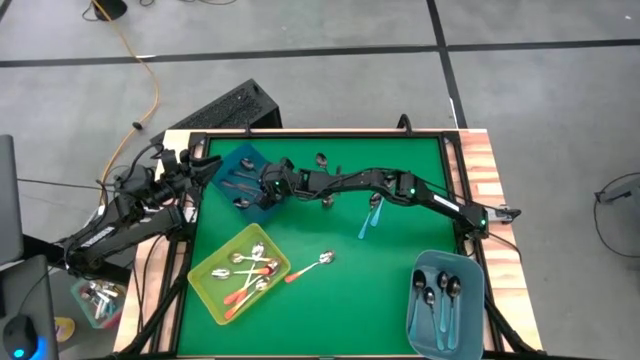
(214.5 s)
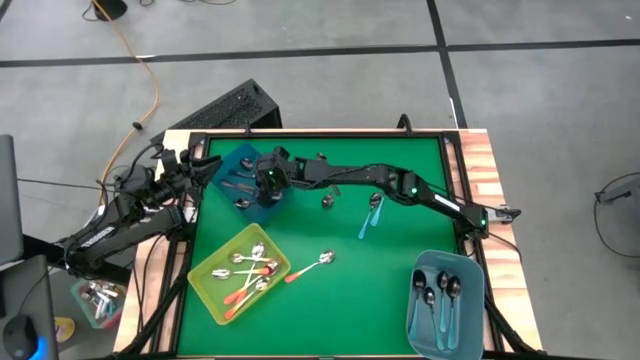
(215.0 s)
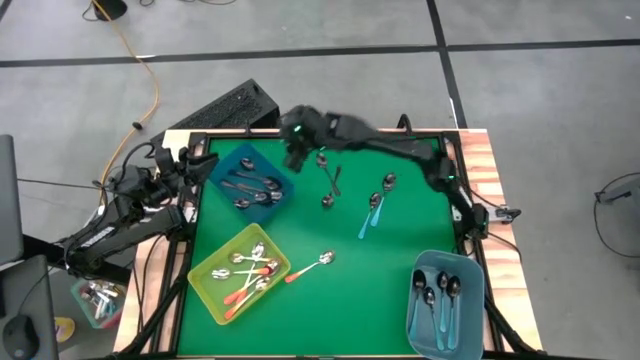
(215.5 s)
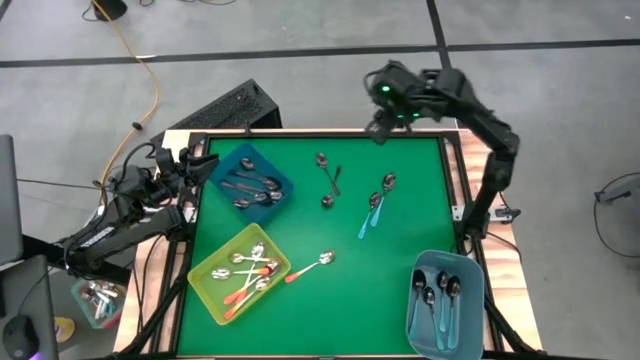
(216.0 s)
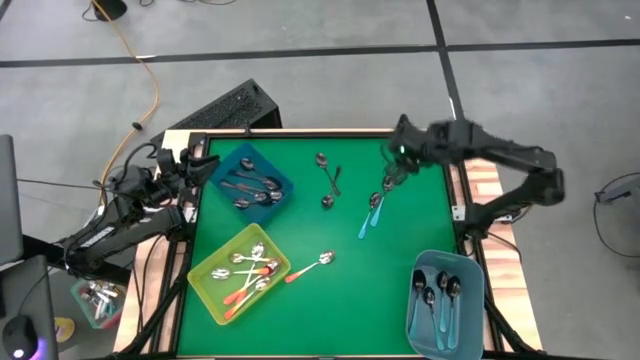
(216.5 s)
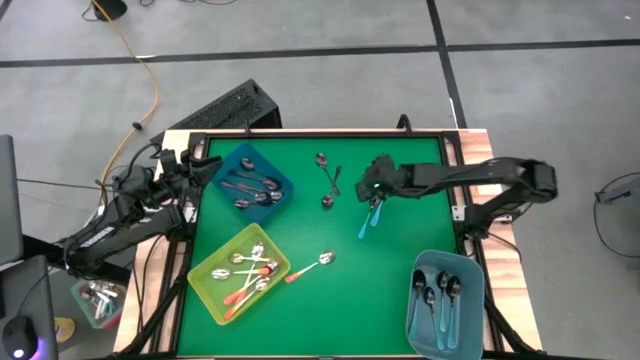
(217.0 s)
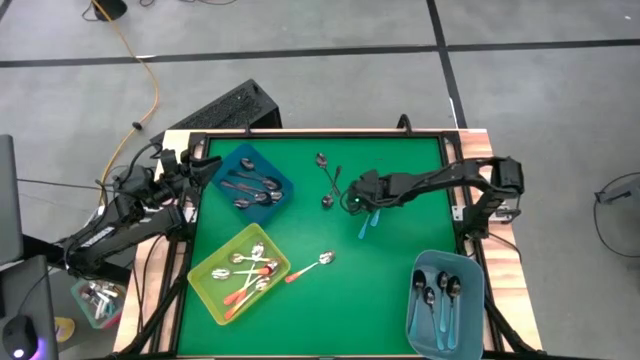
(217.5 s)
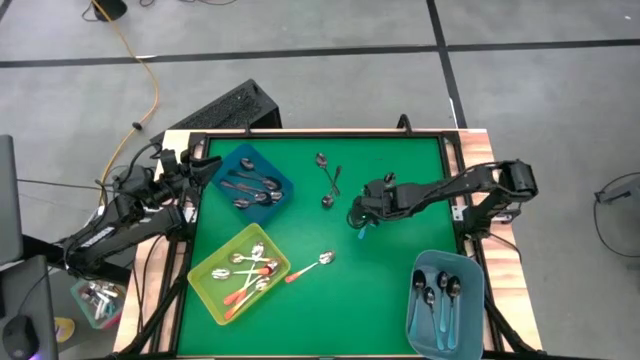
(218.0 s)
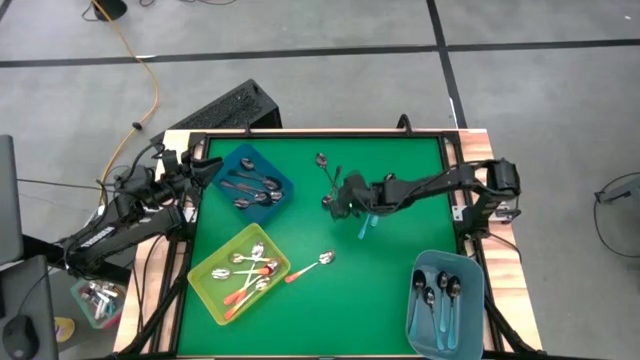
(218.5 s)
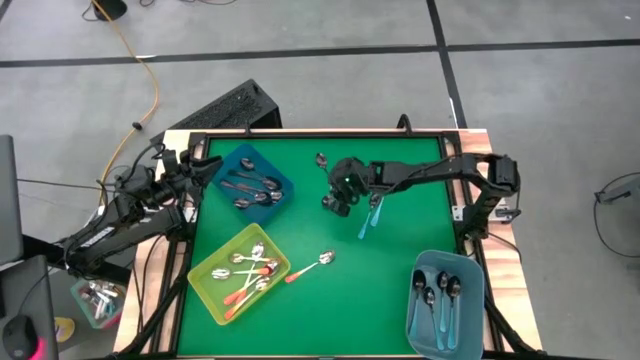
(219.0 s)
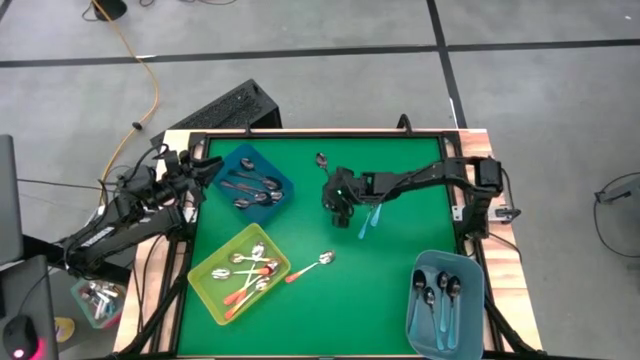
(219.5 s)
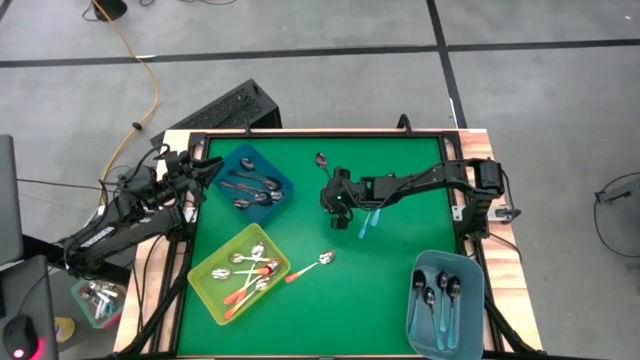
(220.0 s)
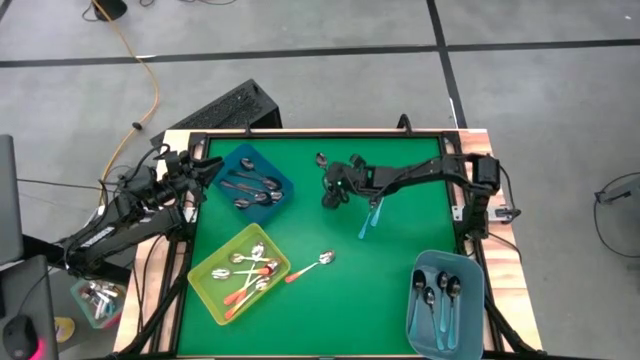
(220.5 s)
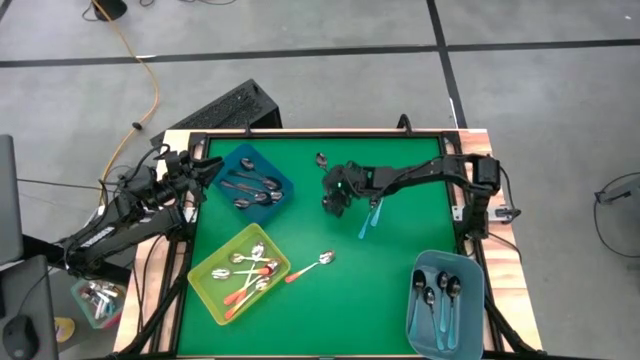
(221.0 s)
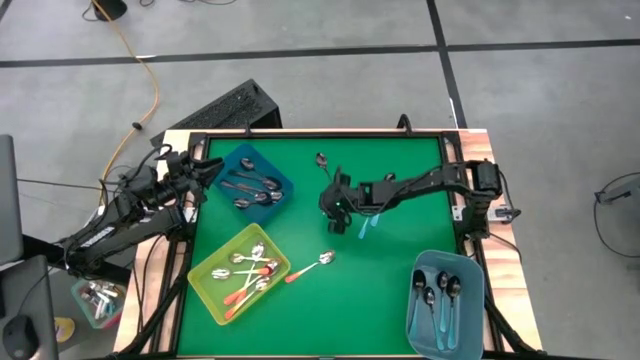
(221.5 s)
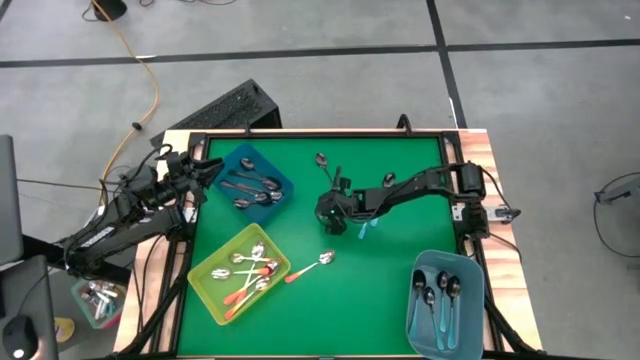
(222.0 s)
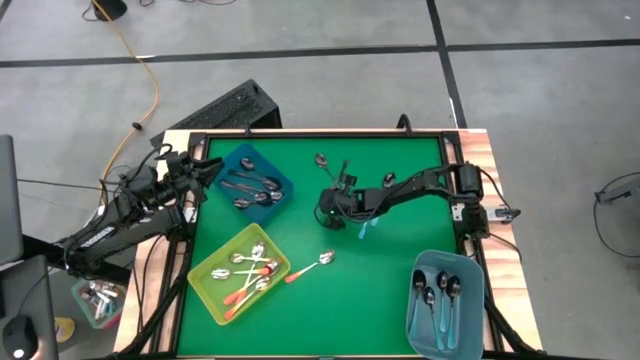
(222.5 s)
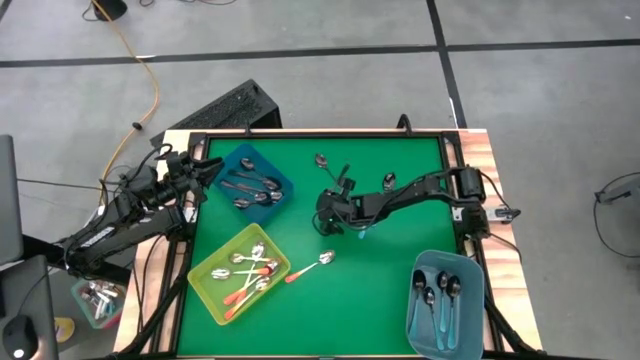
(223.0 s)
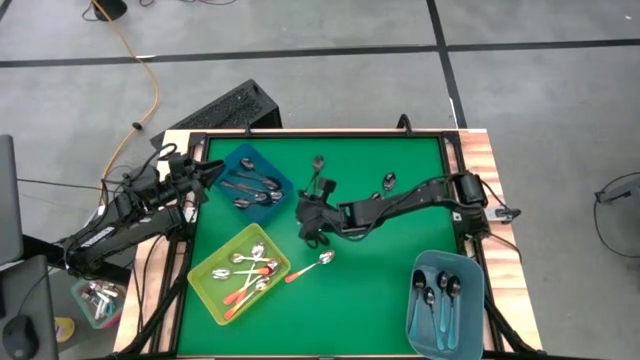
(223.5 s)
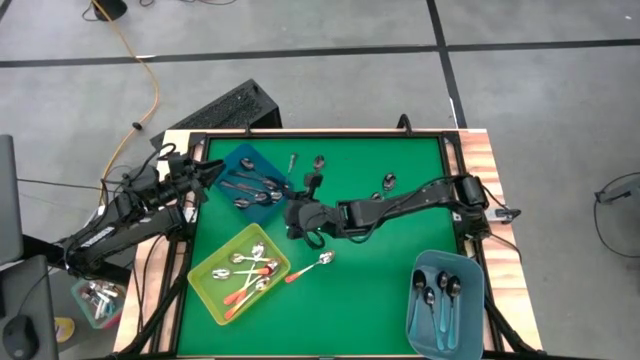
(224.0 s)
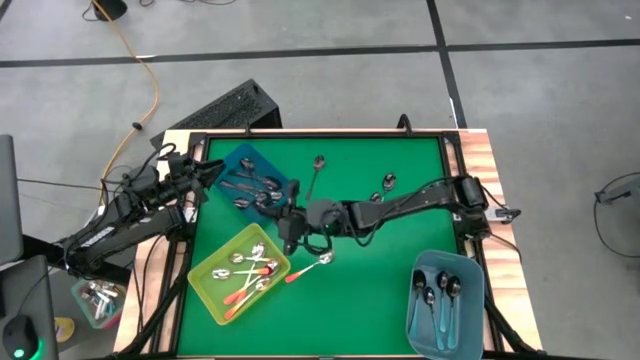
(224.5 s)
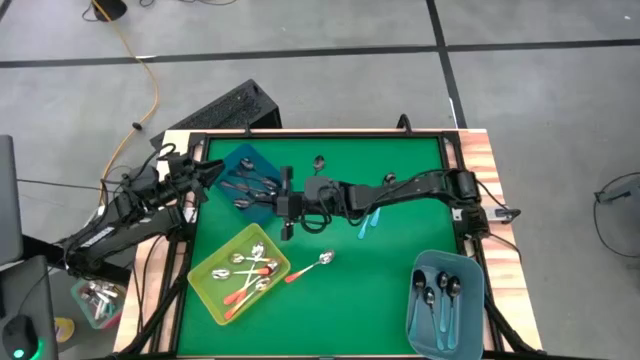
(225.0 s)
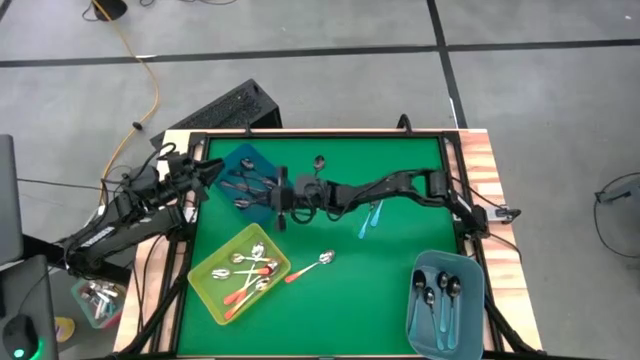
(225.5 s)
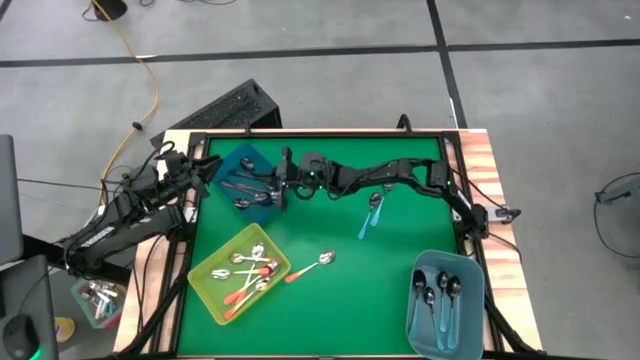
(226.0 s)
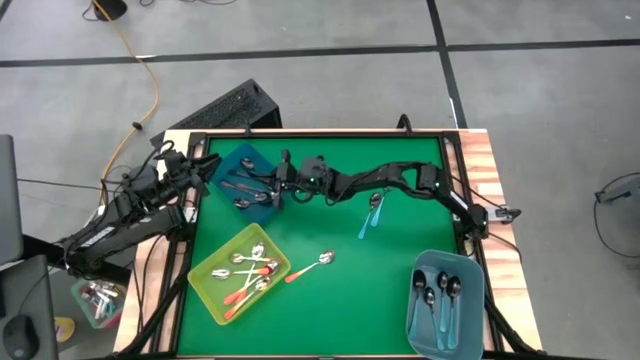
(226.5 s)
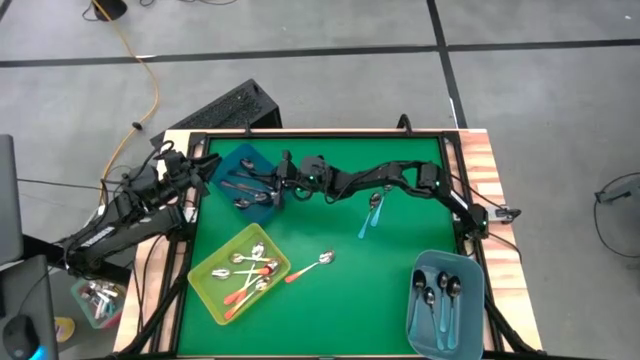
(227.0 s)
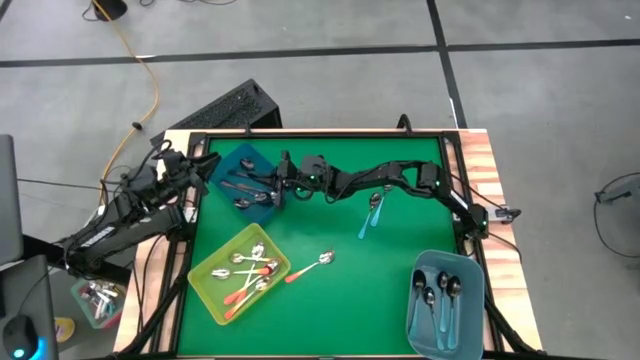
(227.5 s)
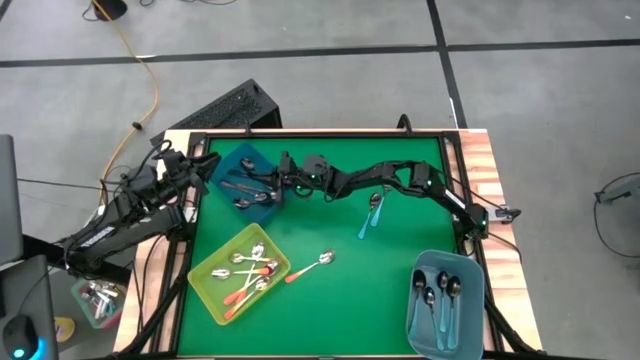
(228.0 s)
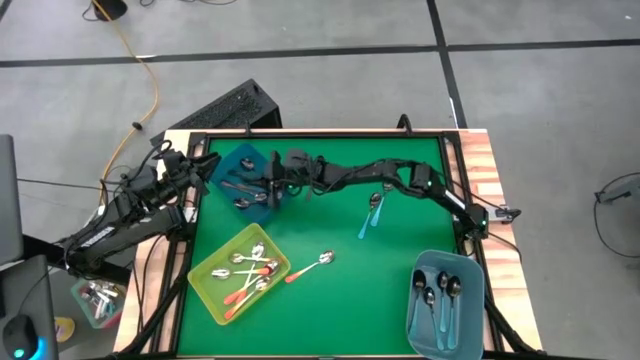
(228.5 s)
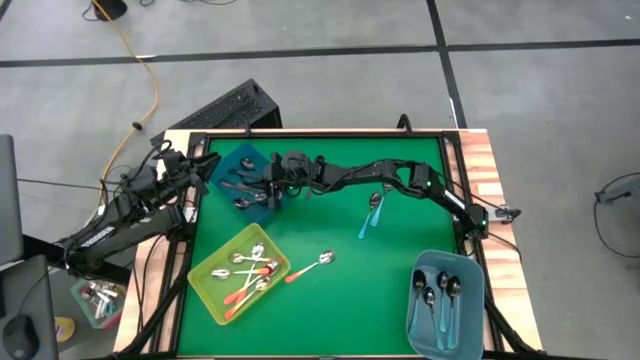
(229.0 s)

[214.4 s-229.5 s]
Task: Sort silverware by color (type)
Put the black spoon into the dark blue bin

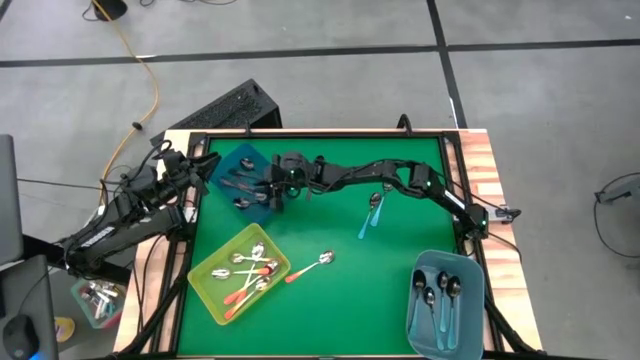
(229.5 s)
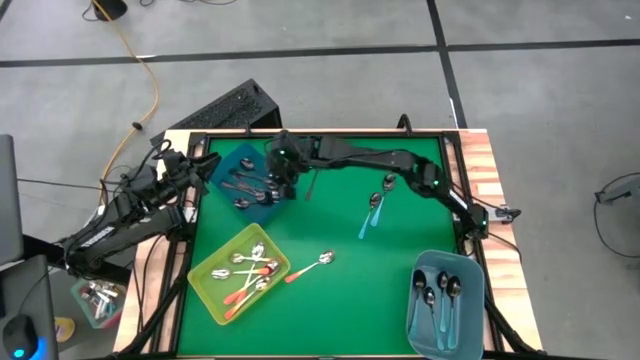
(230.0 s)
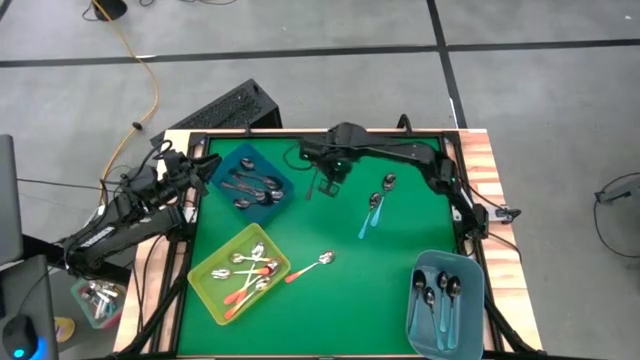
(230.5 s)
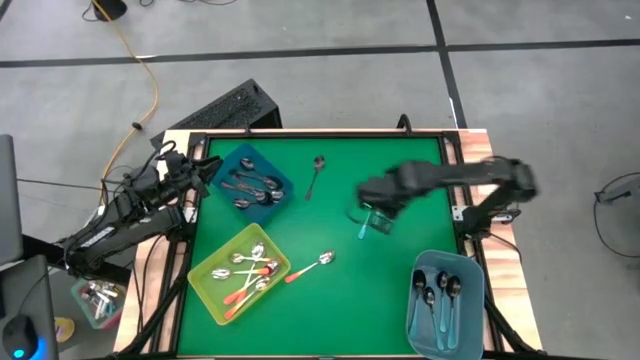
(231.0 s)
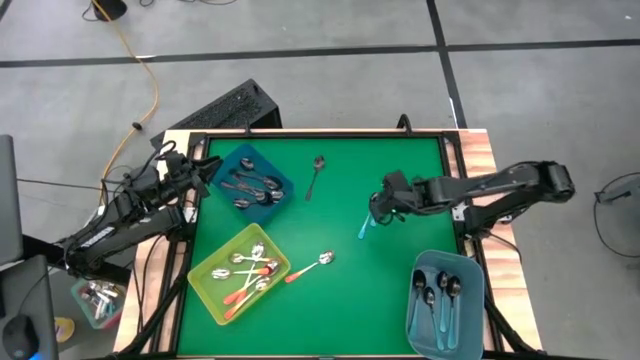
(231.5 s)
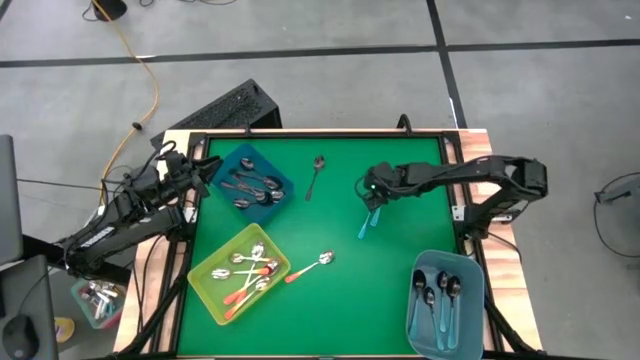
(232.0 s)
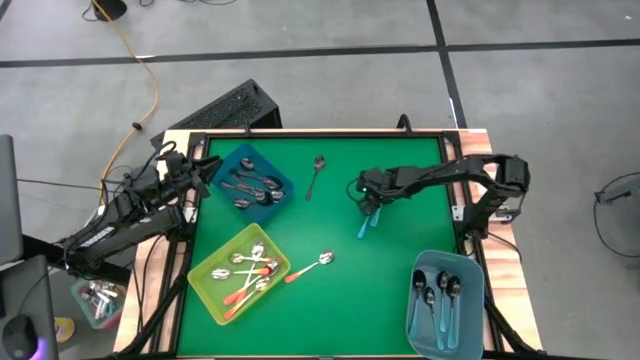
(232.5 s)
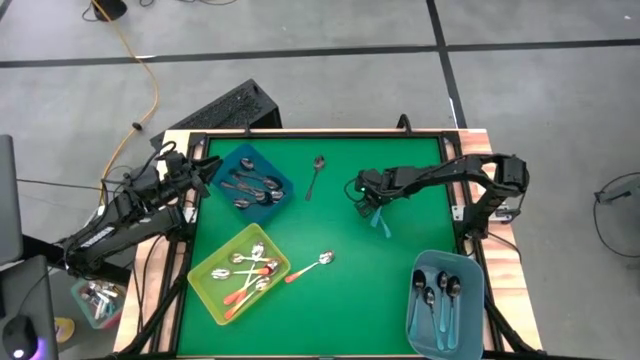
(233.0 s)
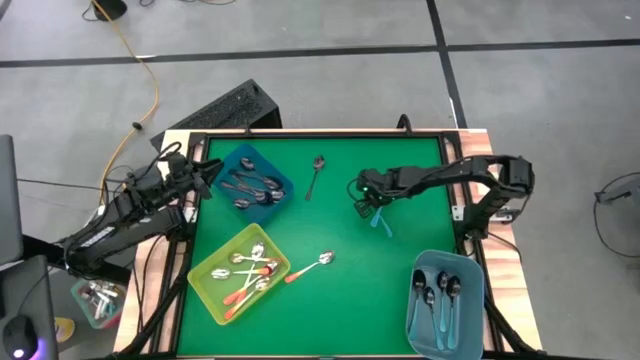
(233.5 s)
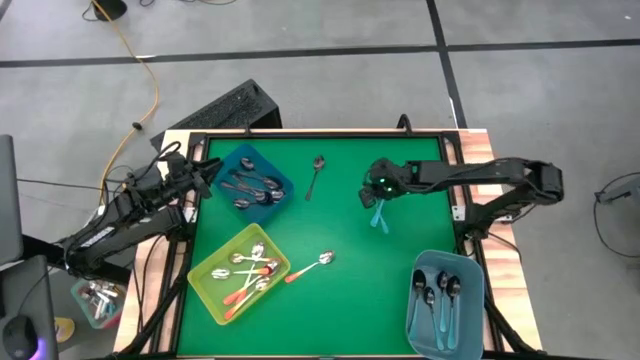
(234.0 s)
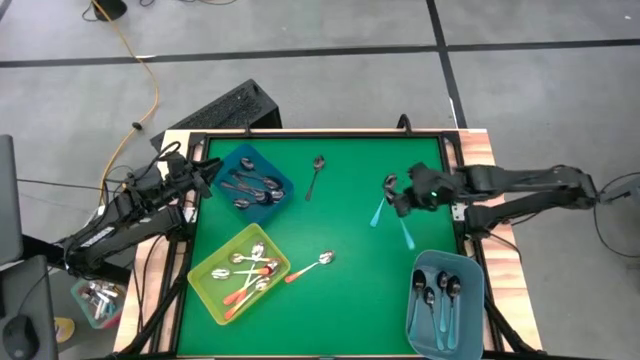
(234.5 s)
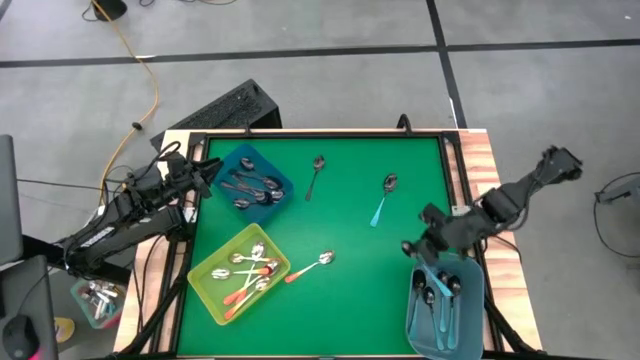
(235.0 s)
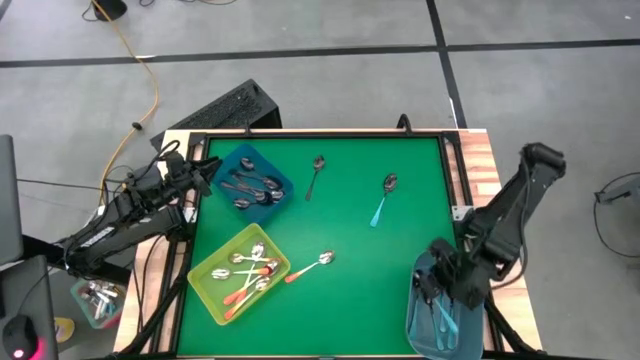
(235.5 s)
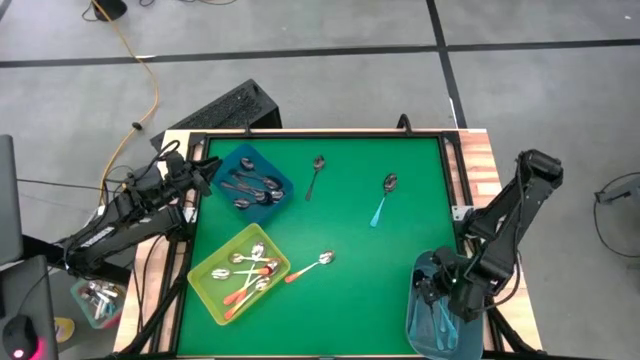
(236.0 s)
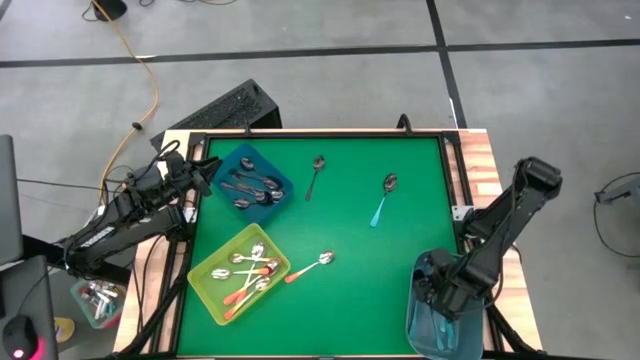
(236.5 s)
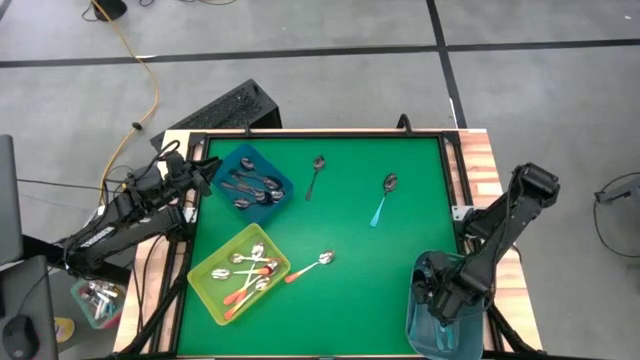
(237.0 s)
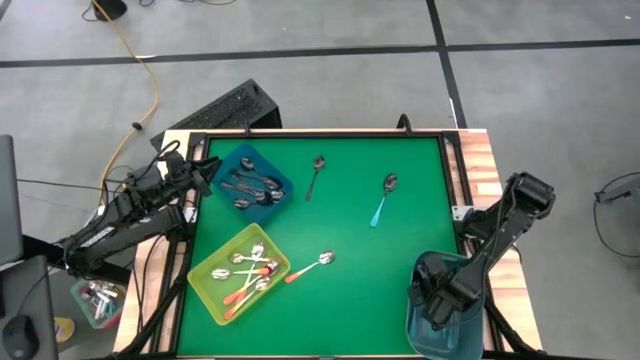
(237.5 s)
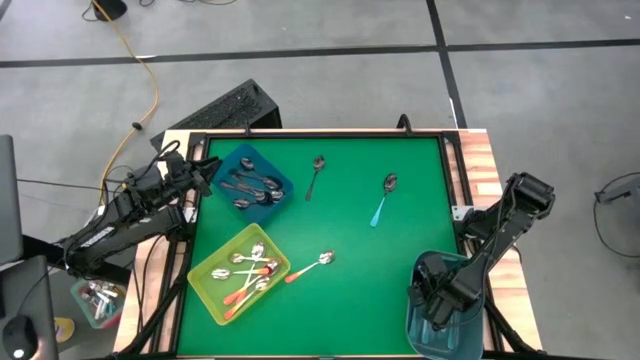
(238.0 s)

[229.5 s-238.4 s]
Put the blue spoon into the blue bin
